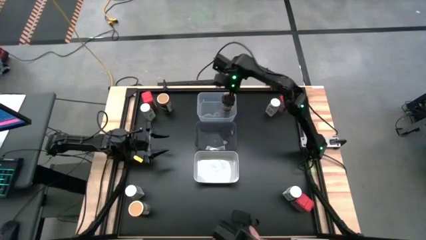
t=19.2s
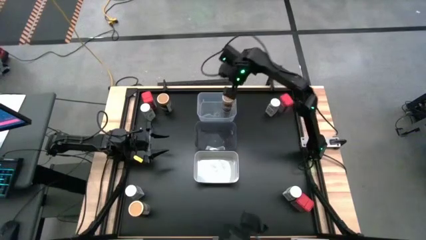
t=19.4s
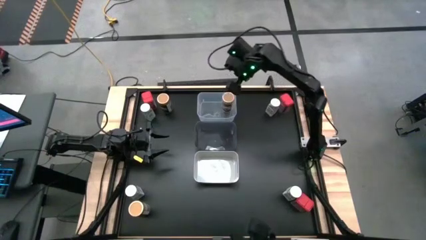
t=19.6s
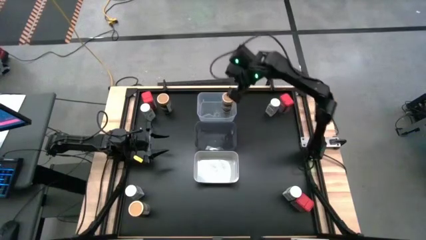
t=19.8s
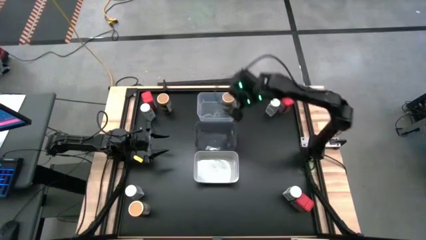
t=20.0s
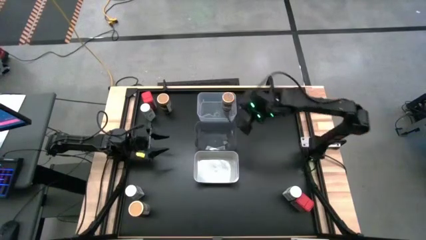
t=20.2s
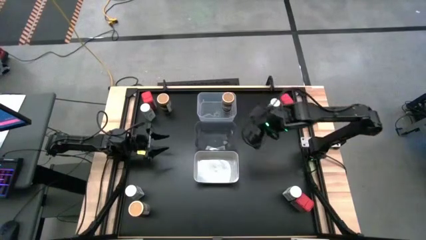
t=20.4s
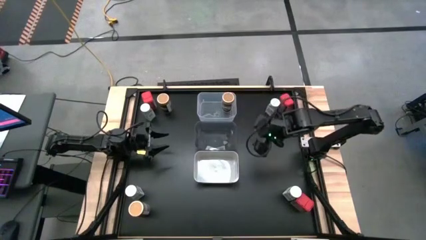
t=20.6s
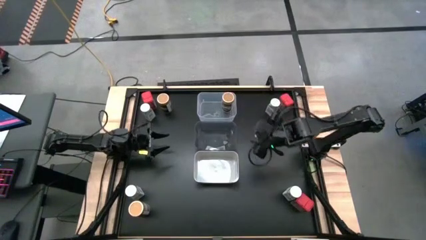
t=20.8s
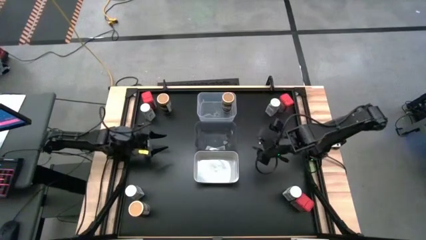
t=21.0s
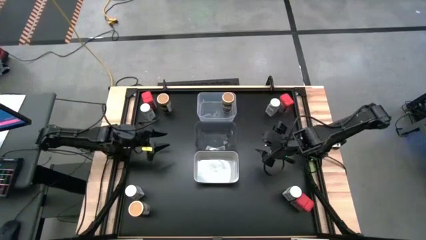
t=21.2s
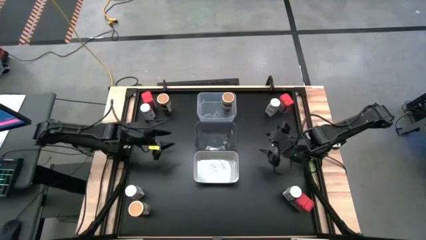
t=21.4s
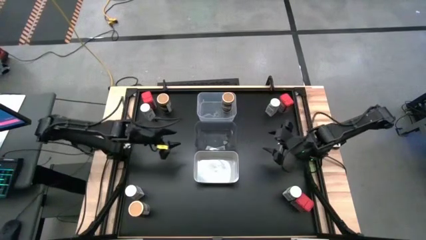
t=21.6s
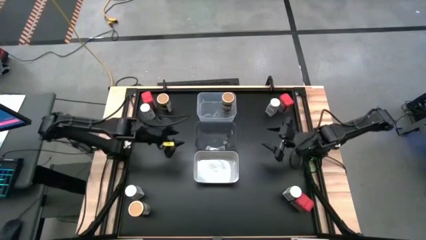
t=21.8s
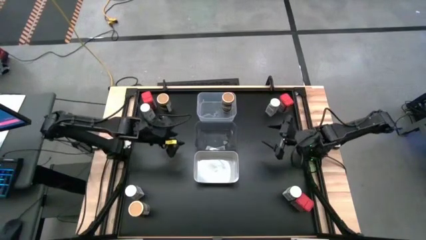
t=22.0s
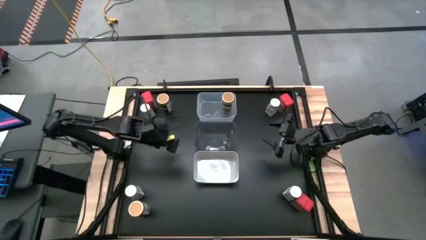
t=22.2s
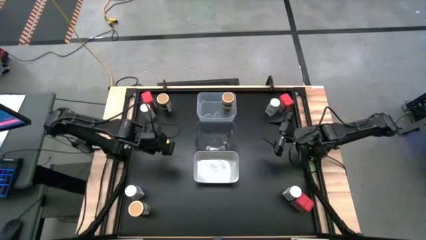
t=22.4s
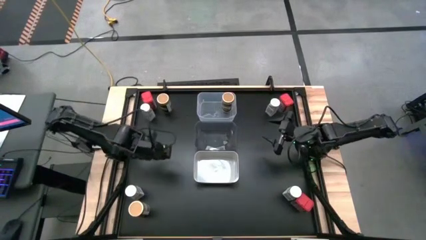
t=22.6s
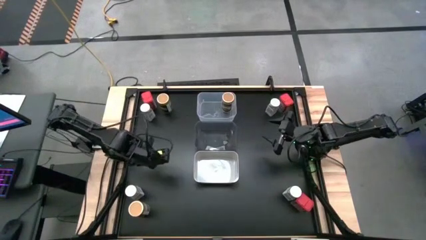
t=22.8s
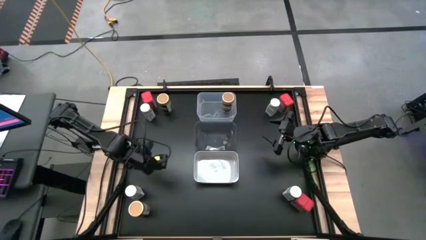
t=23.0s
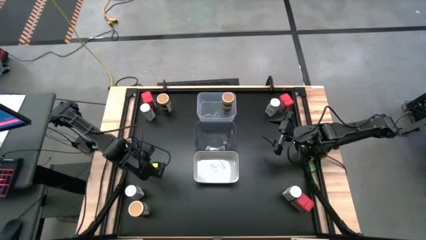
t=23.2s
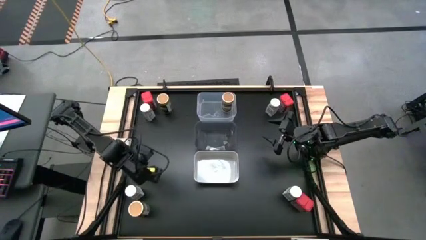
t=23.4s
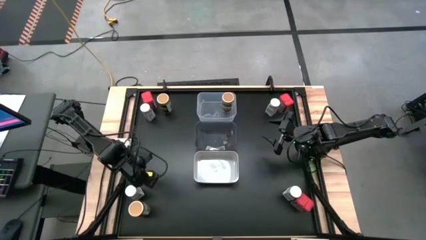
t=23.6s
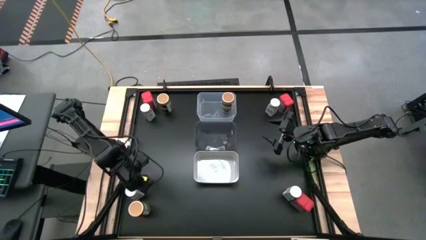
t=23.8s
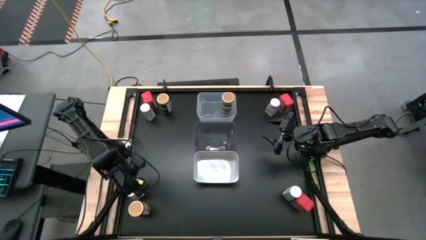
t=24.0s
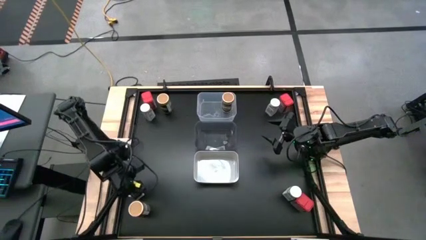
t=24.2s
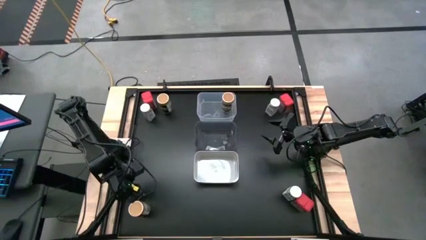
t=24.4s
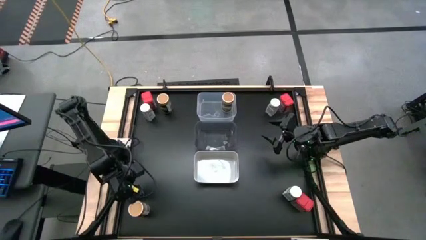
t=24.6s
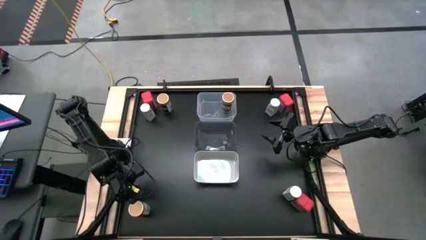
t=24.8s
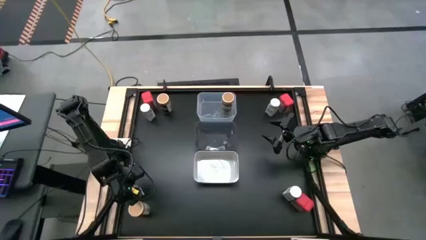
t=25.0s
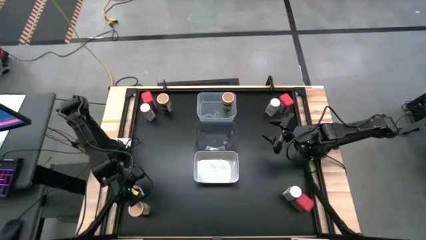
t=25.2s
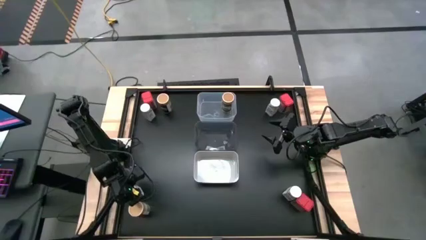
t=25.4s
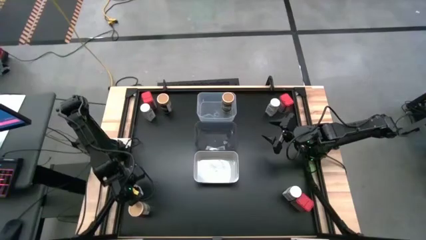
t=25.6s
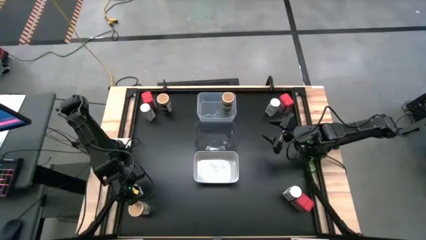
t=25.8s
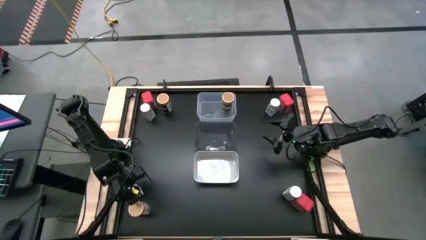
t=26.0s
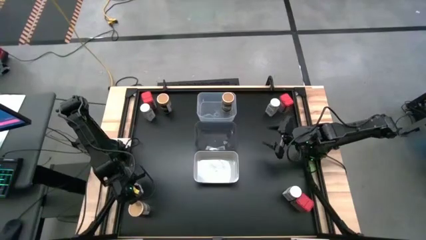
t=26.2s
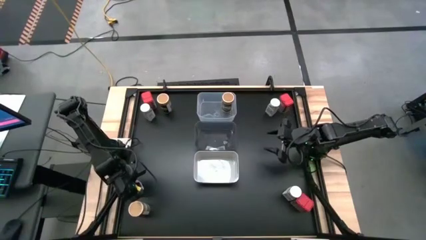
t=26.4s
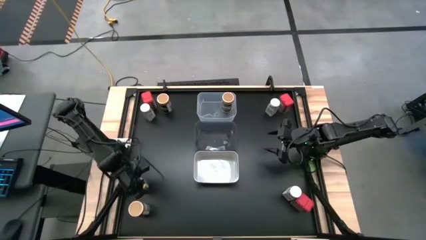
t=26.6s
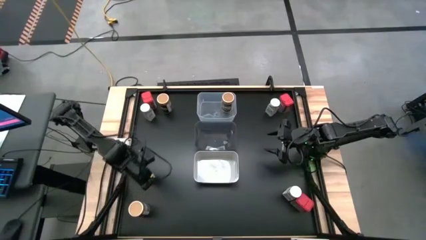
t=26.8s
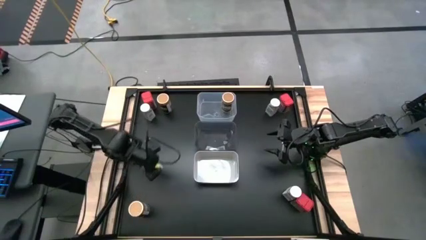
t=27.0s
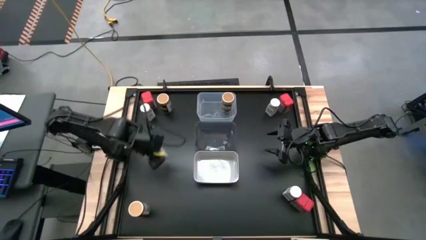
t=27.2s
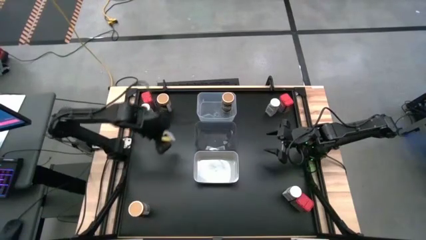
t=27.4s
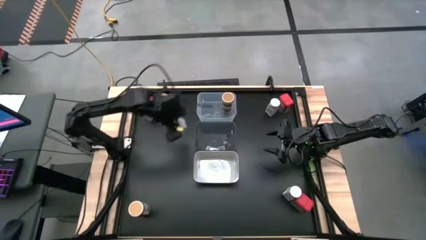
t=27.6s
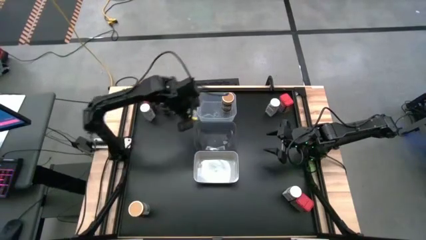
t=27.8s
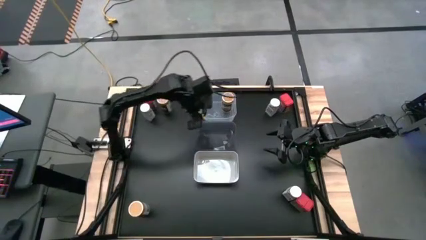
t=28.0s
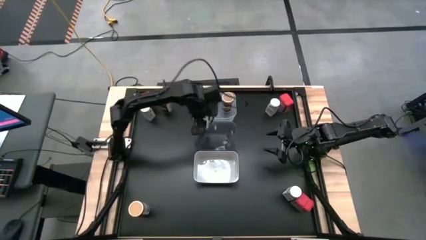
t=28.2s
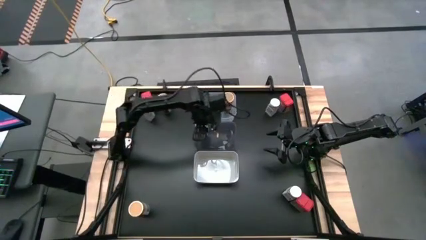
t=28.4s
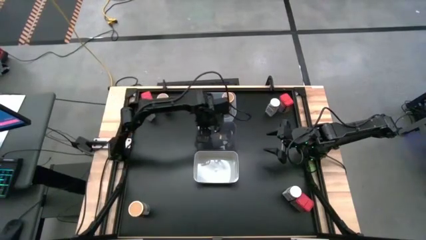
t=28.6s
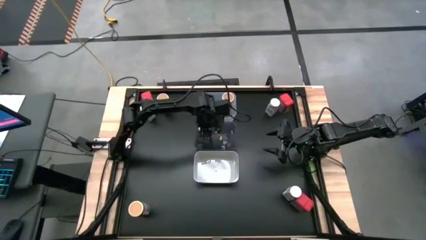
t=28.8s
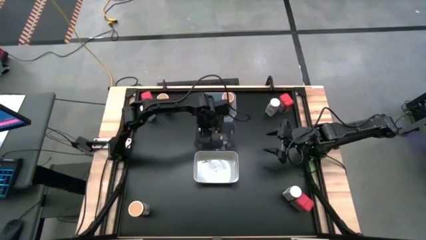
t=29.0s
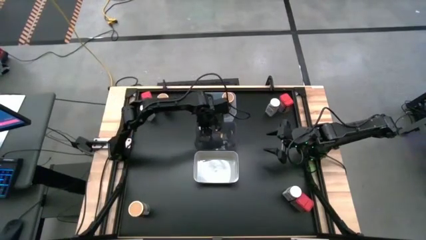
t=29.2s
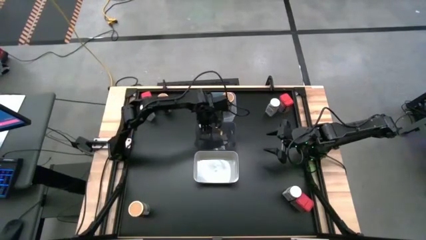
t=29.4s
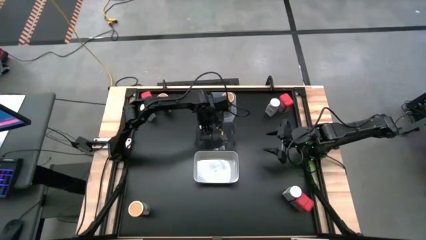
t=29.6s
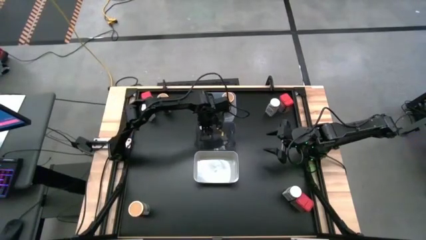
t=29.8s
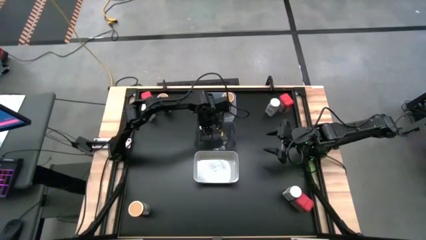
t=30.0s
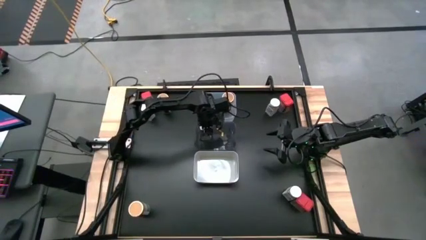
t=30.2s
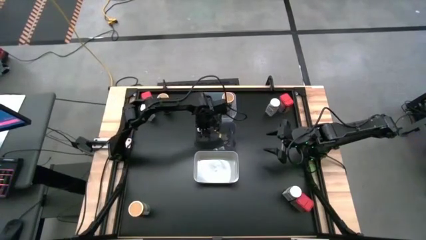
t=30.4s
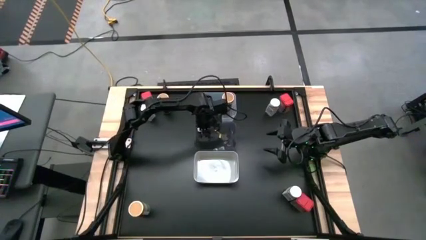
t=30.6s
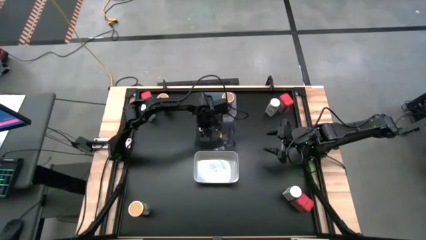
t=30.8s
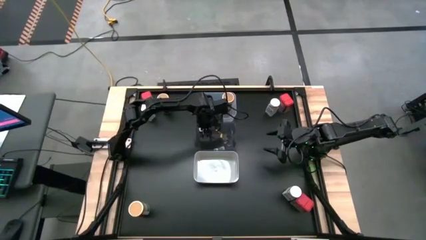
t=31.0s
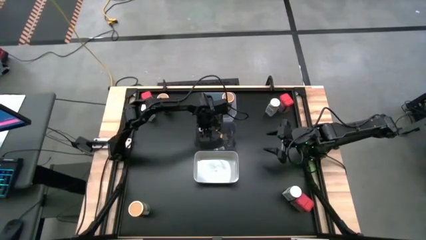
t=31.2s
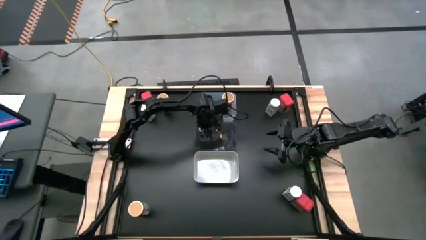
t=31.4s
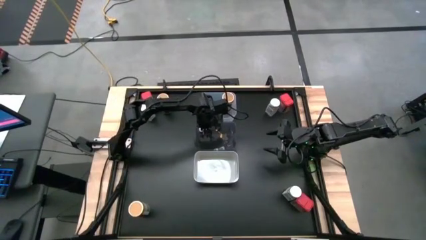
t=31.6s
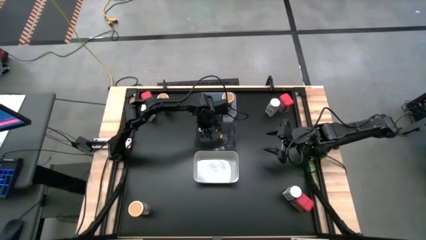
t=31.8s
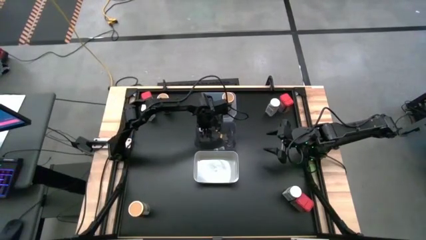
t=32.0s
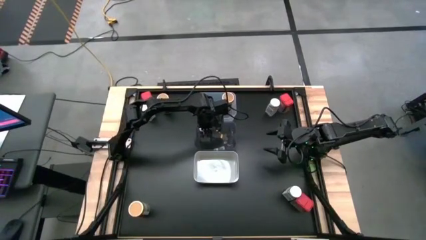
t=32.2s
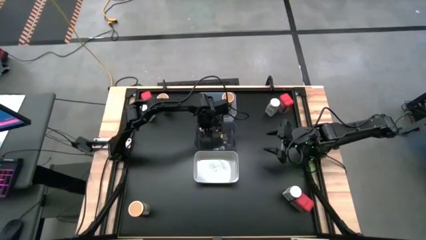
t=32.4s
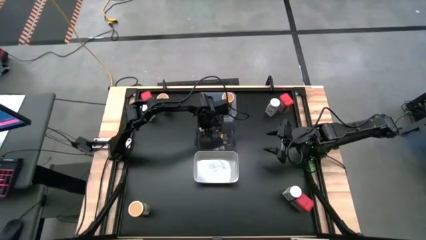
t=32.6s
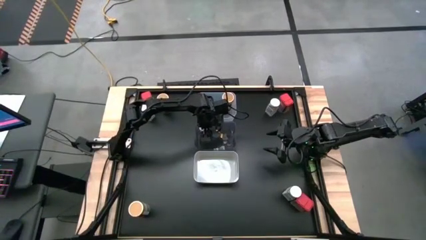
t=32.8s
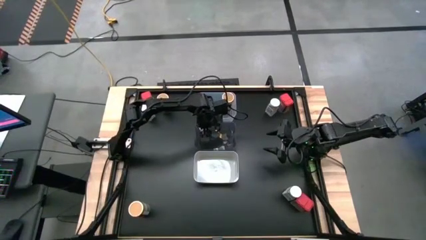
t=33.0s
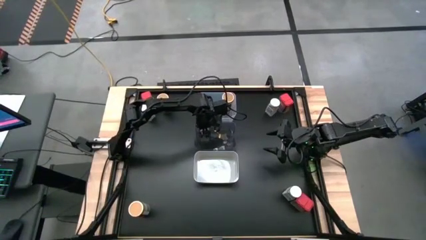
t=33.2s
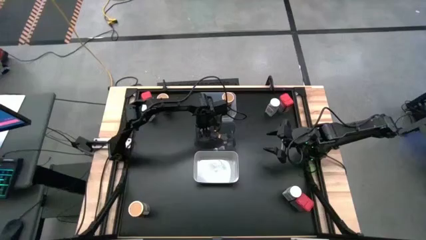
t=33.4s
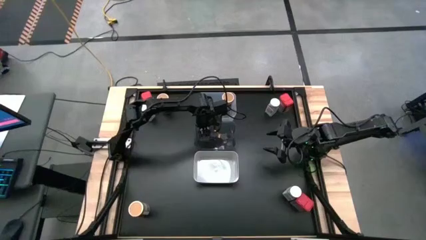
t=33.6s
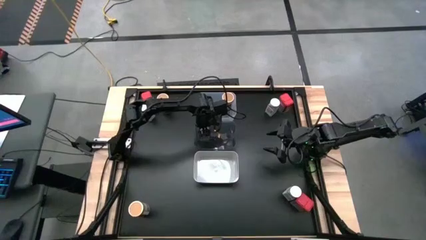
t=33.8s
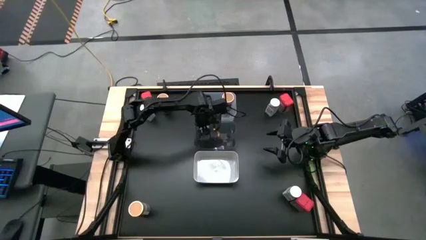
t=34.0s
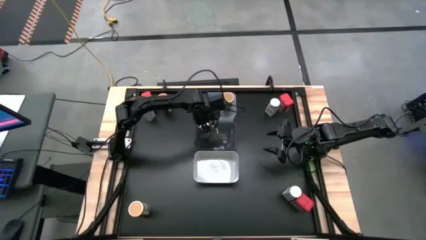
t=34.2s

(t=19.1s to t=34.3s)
Task: Sort spices by type
Put the bottom left white seasoning bottle into the black transparent bin
